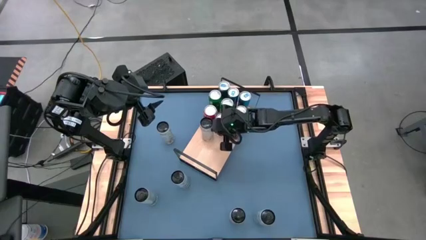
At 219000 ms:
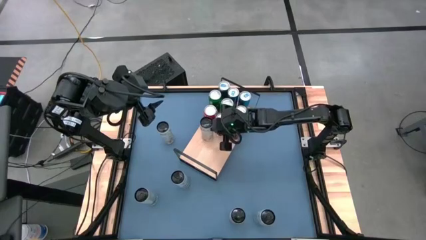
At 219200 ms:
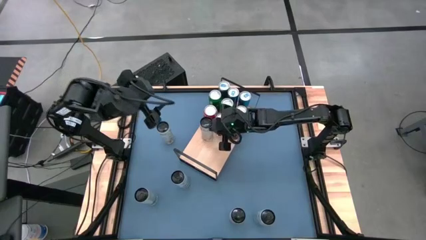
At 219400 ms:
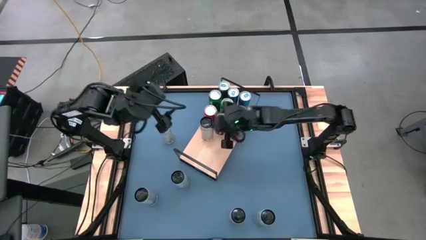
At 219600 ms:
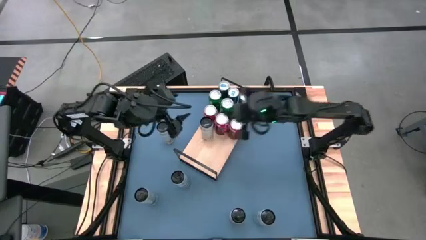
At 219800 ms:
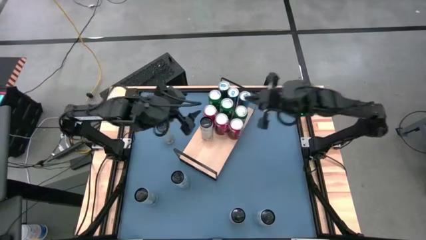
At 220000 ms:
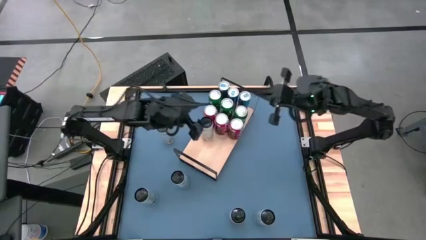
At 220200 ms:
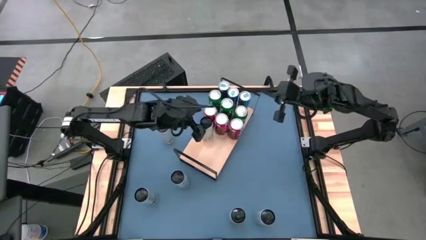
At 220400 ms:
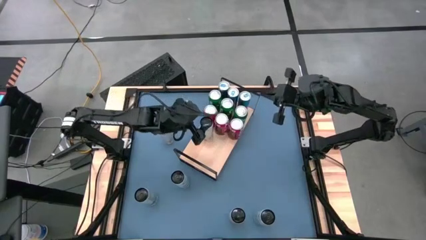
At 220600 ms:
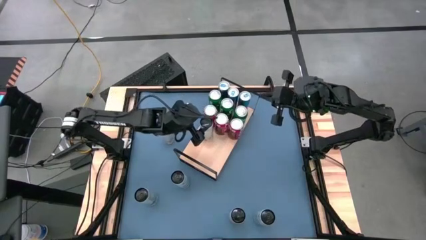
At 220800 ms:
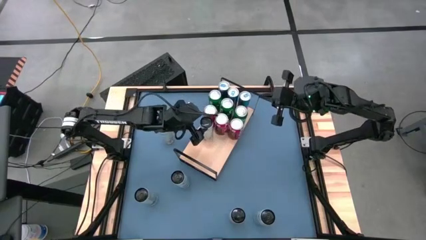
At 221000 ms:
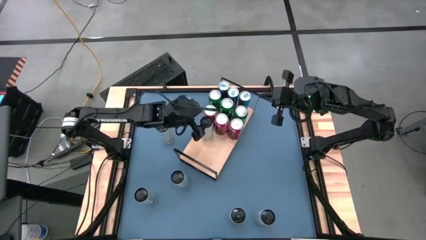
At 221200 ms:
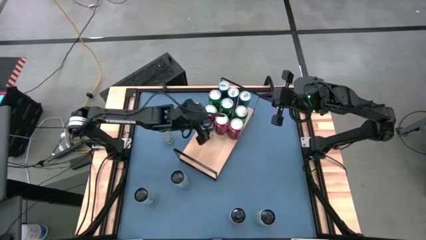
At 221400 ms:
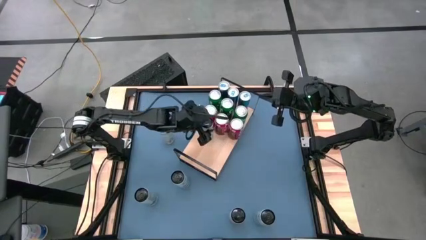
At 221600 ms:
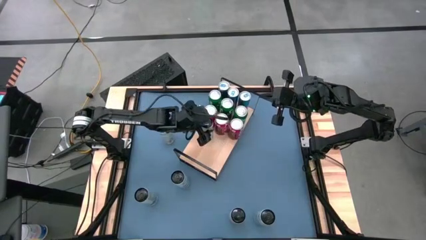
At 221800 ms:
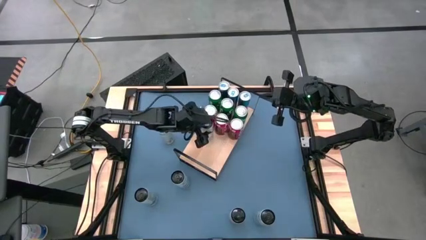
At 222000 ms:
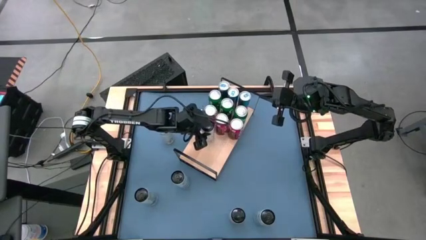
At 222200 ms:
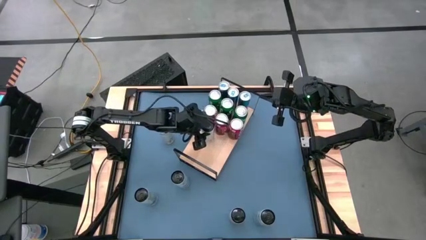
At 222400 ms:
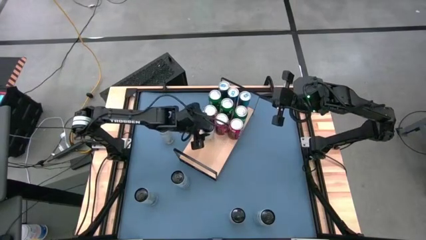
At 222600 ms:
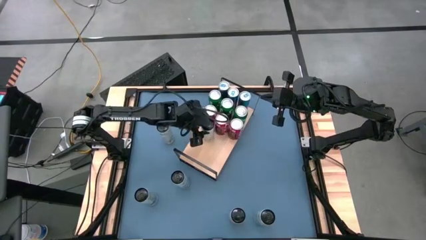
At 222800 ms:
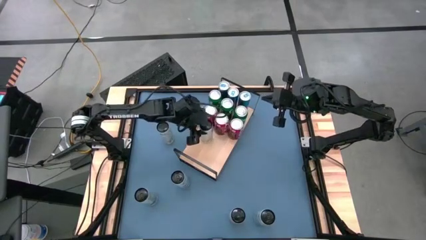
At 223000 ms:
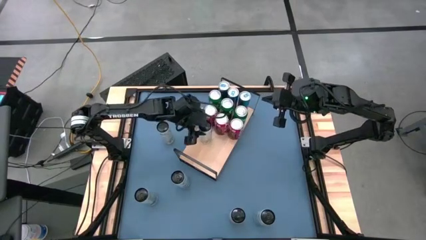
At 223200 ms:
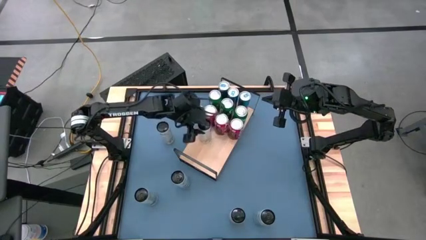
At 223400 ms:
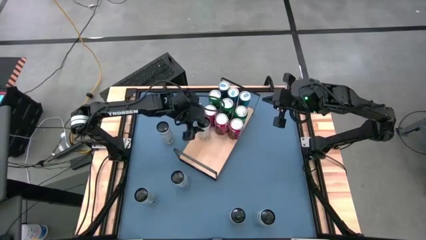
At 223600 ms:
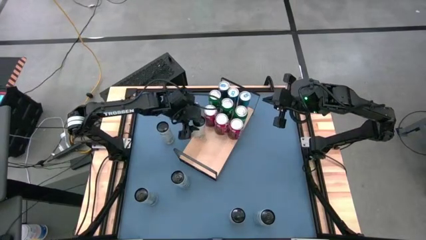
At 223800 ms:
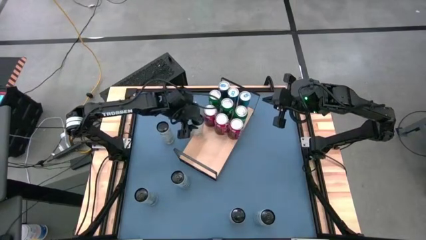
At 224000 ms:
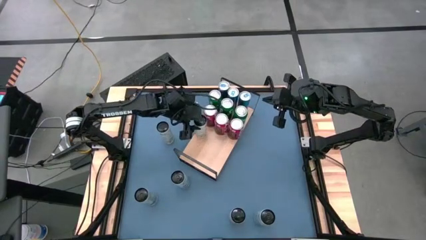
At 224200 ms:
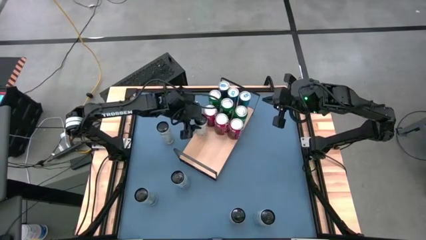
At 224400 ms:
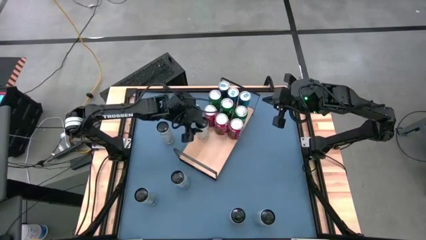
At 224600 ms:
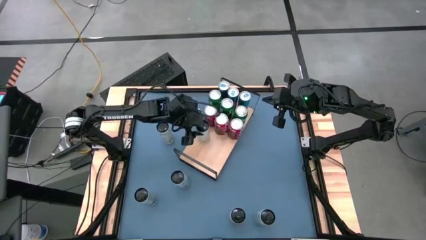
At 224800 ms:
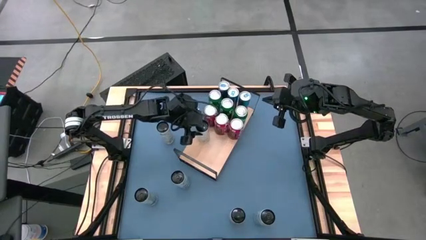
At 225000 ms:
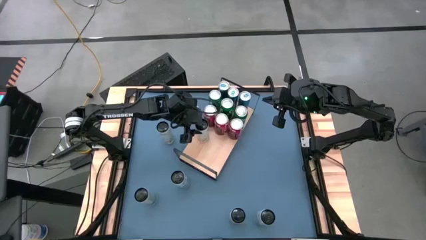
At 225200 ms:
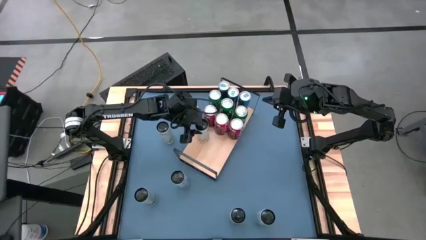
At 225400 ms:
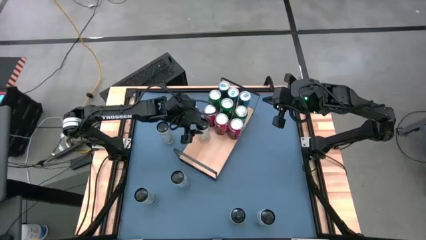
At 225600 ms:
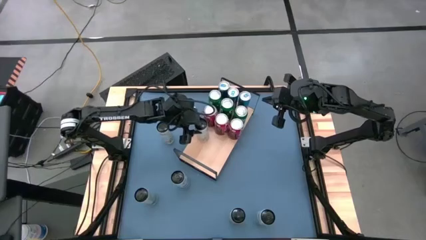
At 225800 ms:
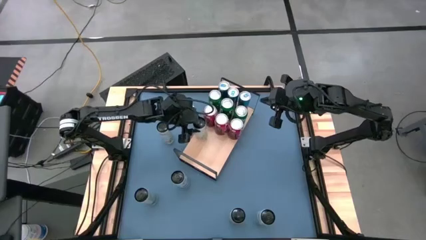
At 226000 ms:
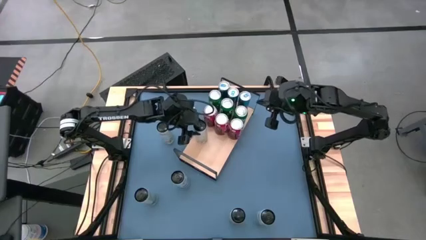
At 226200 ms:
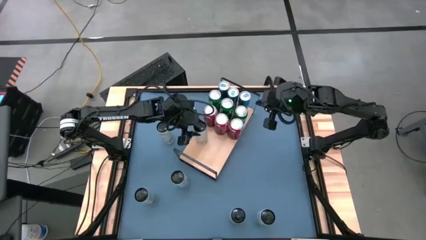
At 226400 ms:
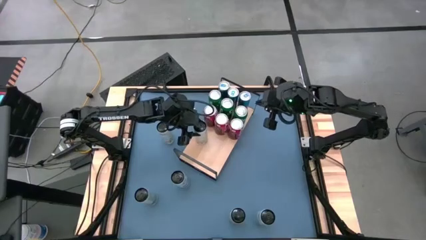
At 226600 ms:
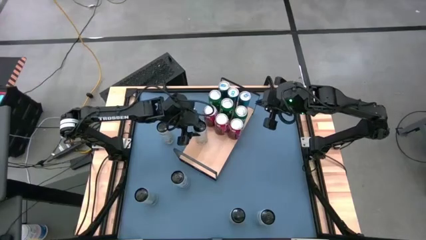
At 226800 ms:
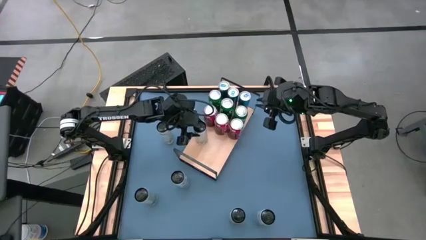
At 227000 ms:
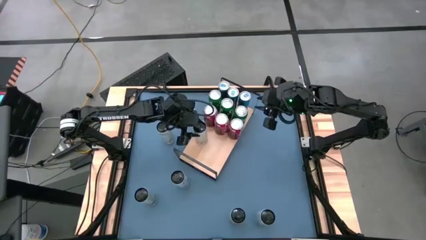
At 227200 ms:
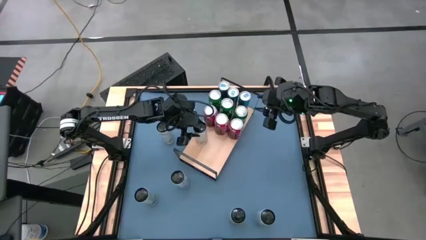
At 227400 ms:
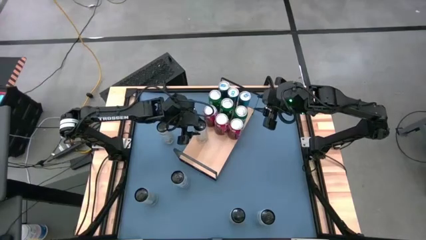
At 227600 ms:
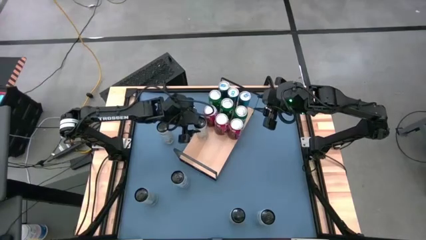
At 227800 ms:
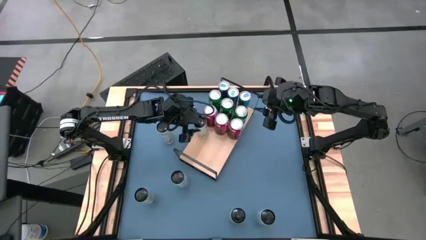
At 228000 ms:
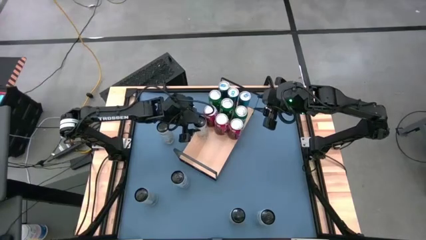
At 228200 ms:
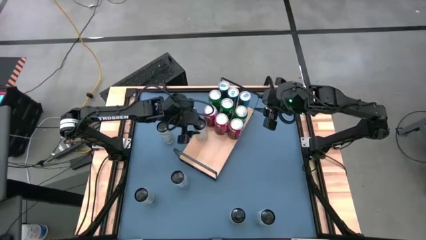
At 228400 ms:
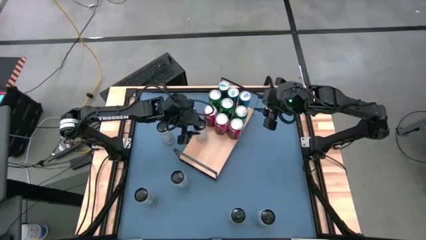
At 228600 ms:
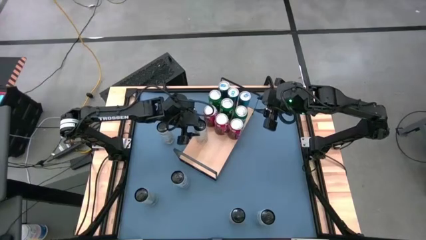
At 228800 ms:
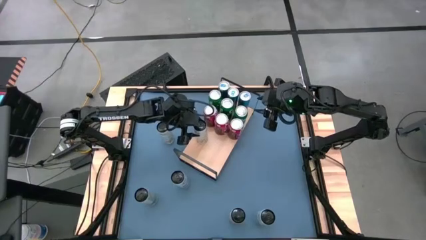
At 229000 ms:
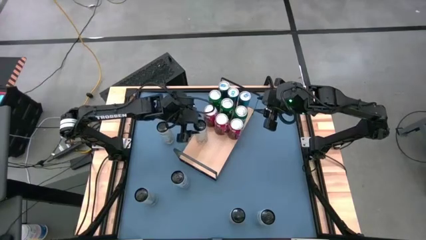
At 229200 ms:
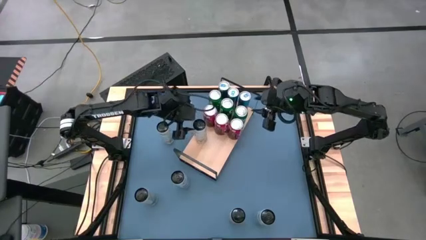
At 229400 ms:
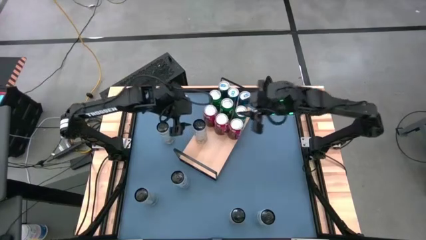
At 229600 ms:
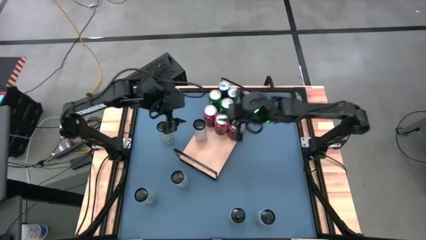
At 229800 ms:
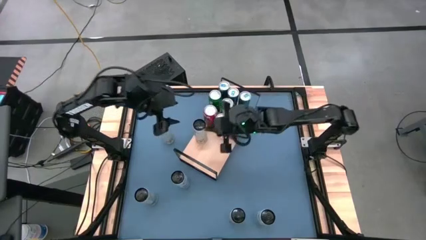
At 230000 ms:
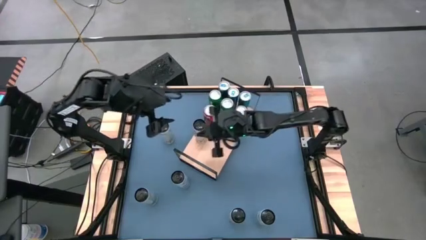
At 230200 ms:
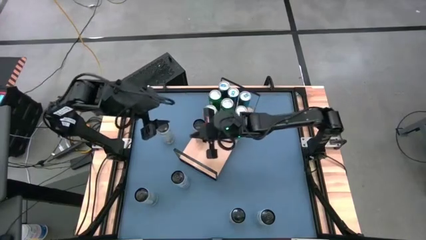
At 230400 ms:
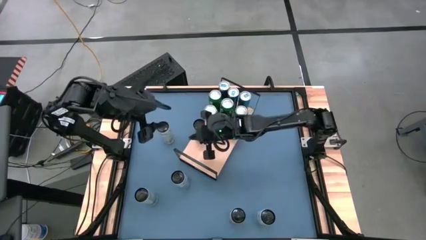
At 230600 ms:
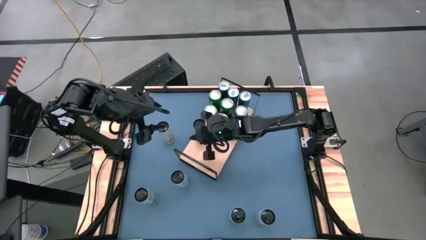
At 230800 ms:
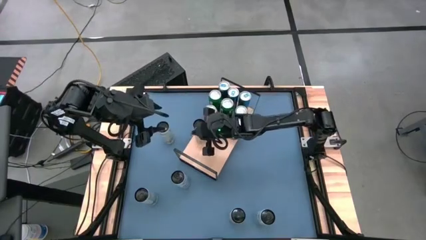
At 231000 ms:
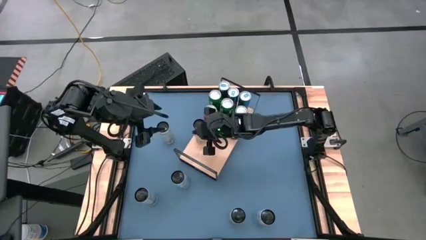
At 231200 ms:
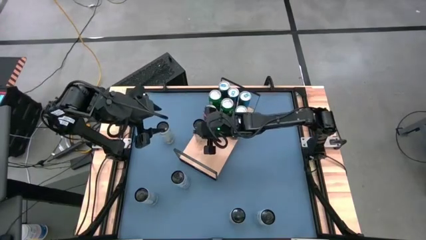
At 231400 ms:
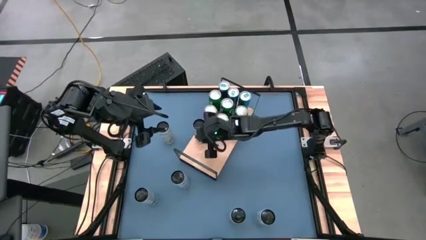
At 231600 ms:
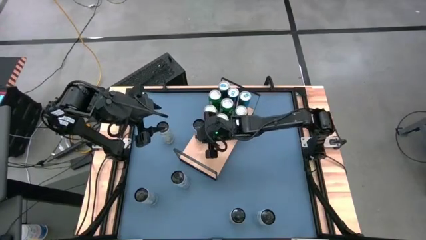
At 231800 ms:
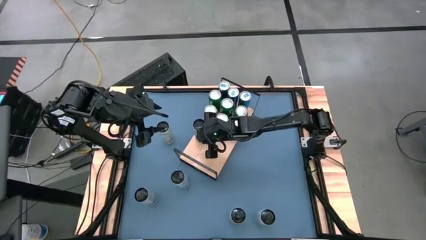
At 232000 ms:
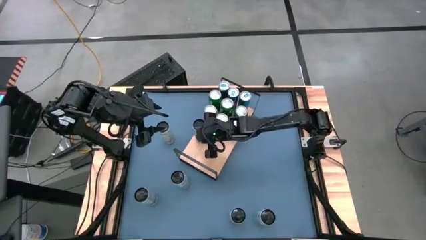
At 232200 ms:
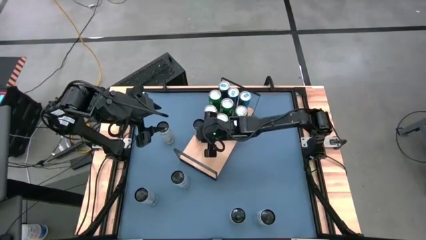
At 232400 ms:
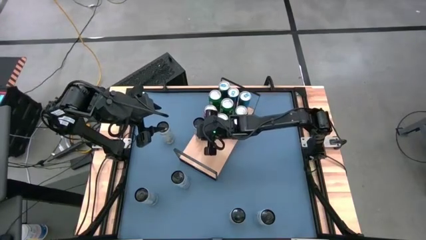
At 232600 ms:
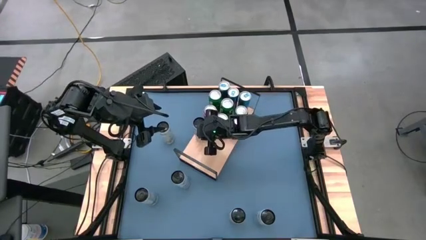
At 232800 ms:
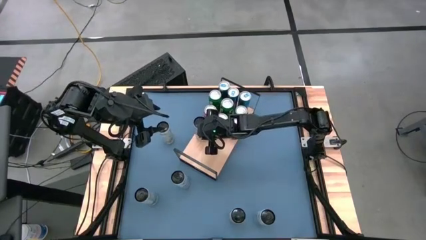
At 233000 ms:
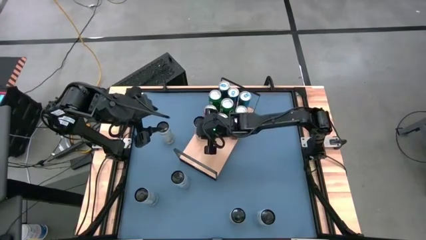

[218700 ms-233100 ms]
Task: Place canned beverage on shelf
Put the right white yellow soda can on the shelf
